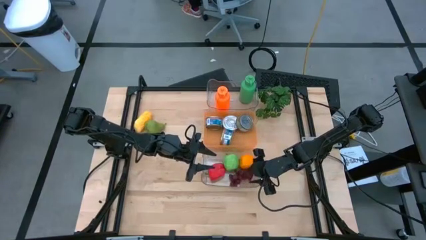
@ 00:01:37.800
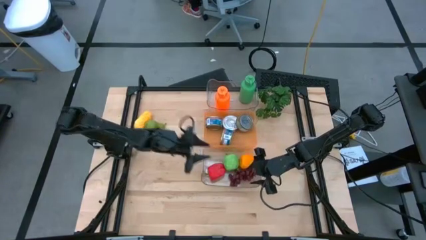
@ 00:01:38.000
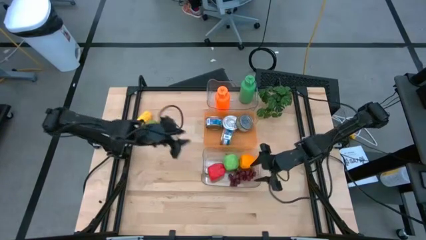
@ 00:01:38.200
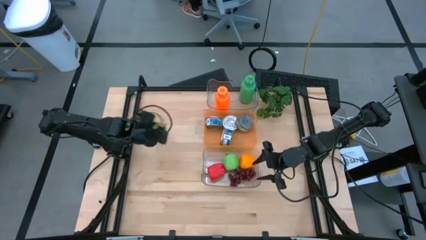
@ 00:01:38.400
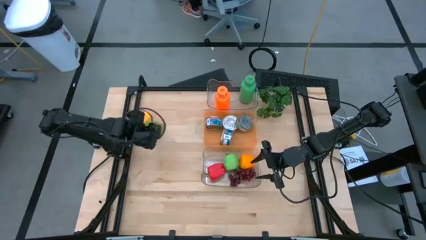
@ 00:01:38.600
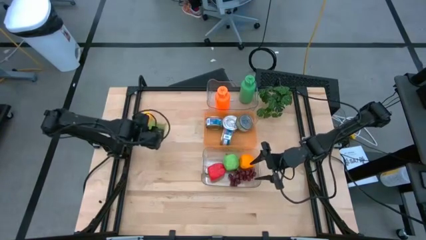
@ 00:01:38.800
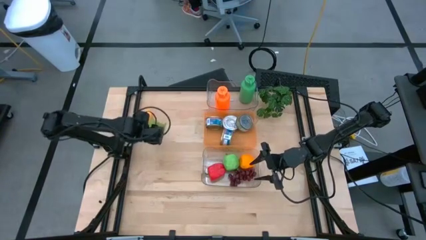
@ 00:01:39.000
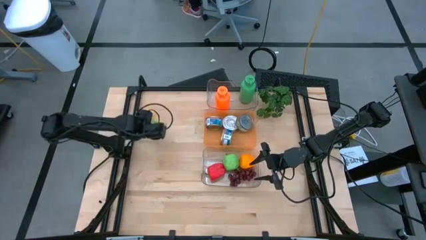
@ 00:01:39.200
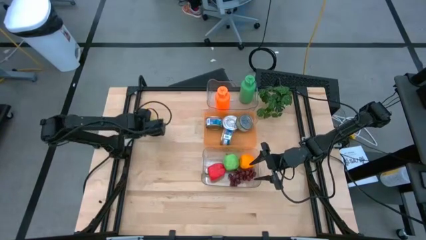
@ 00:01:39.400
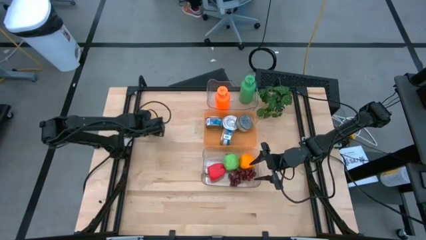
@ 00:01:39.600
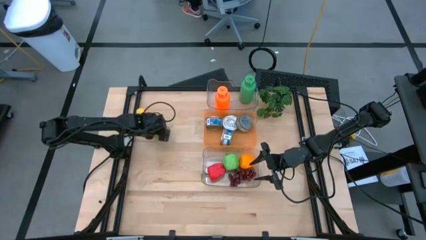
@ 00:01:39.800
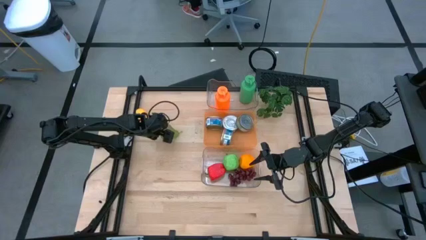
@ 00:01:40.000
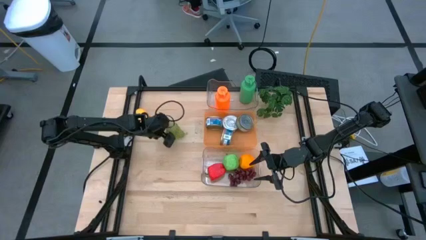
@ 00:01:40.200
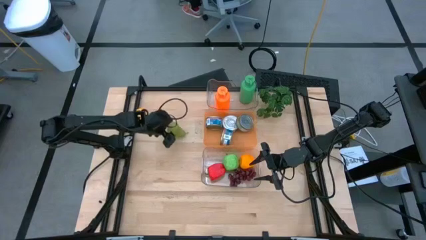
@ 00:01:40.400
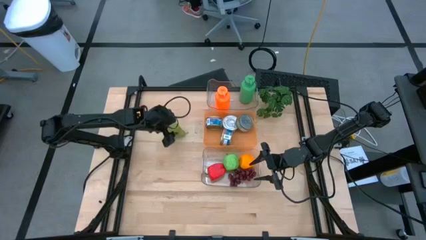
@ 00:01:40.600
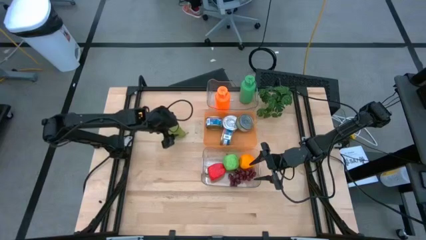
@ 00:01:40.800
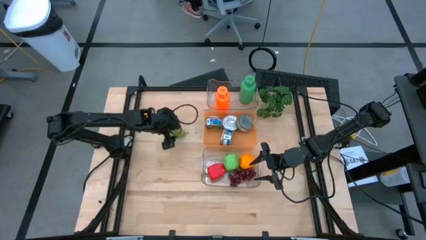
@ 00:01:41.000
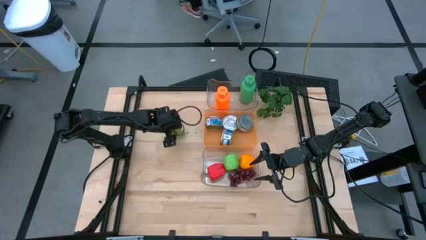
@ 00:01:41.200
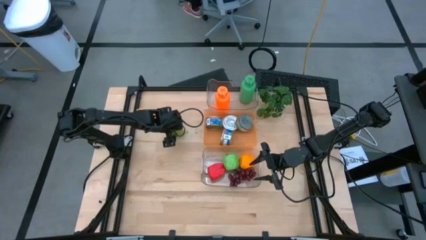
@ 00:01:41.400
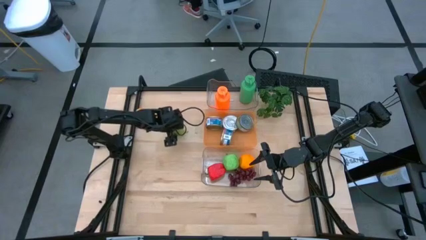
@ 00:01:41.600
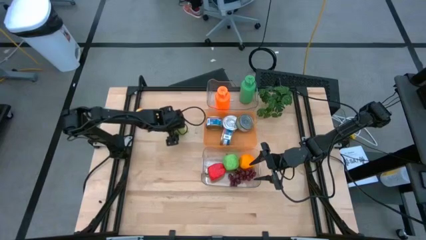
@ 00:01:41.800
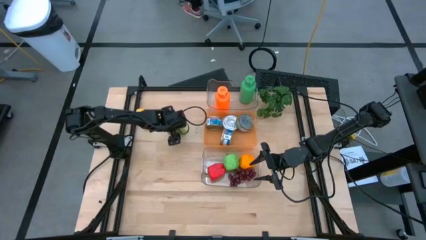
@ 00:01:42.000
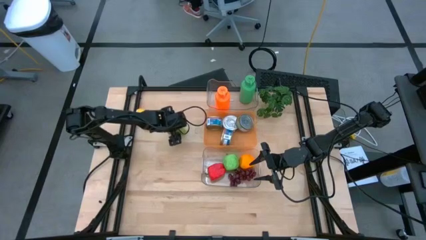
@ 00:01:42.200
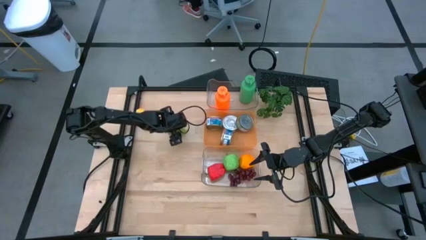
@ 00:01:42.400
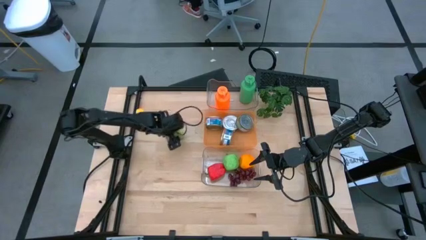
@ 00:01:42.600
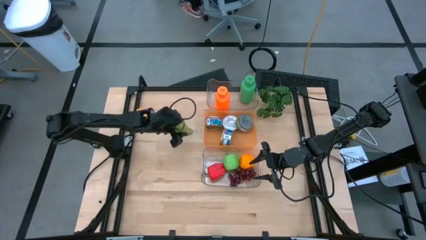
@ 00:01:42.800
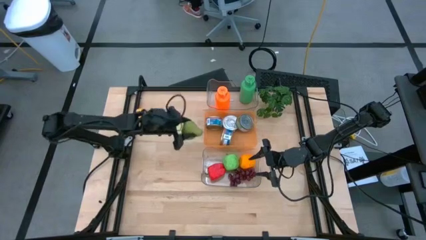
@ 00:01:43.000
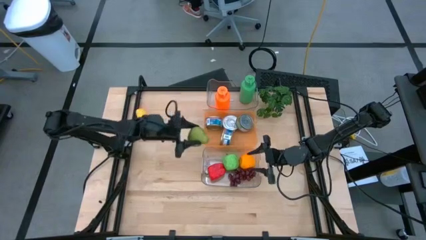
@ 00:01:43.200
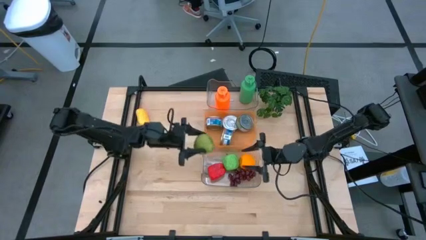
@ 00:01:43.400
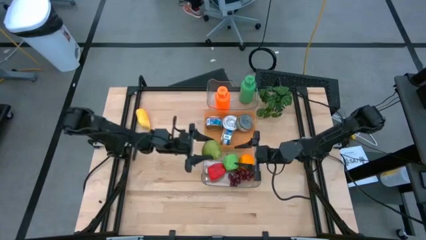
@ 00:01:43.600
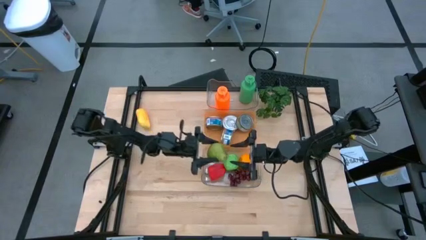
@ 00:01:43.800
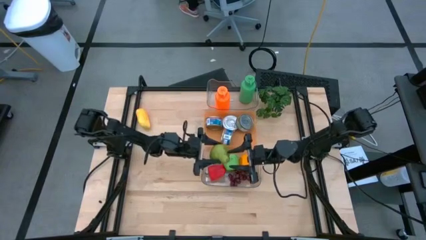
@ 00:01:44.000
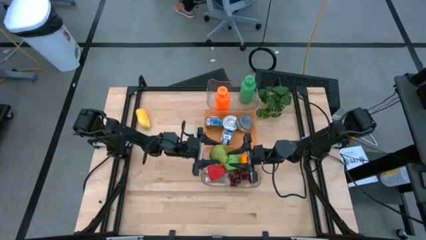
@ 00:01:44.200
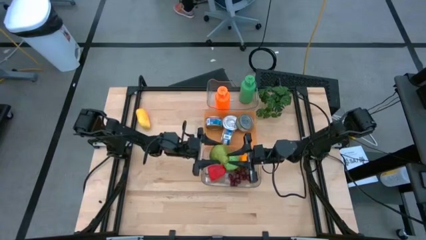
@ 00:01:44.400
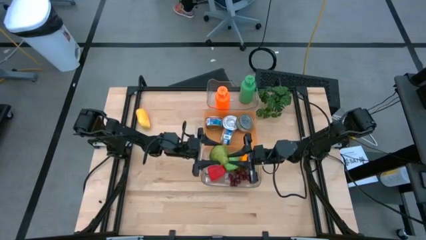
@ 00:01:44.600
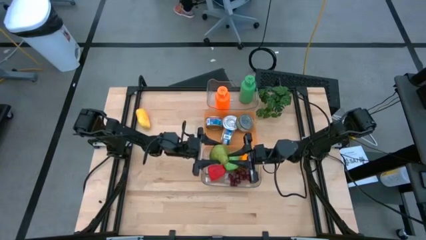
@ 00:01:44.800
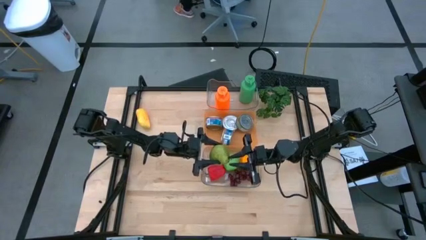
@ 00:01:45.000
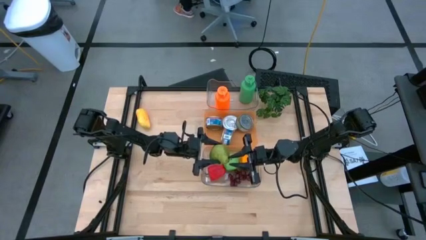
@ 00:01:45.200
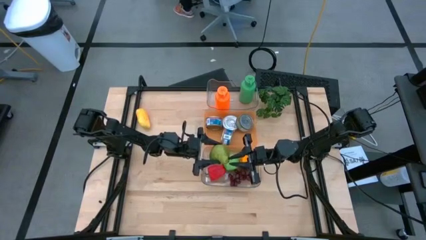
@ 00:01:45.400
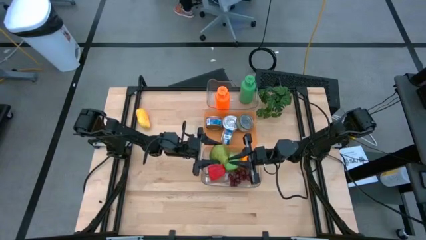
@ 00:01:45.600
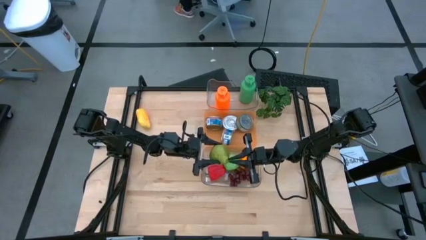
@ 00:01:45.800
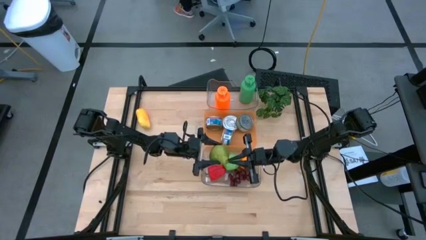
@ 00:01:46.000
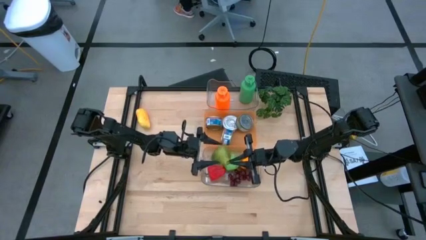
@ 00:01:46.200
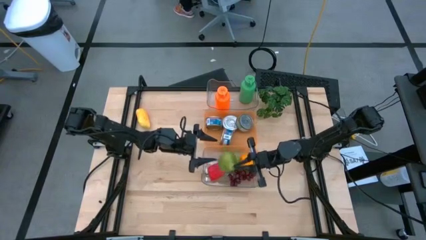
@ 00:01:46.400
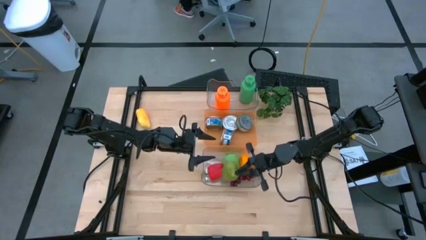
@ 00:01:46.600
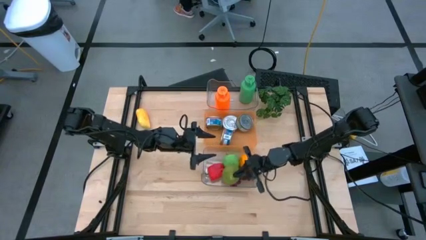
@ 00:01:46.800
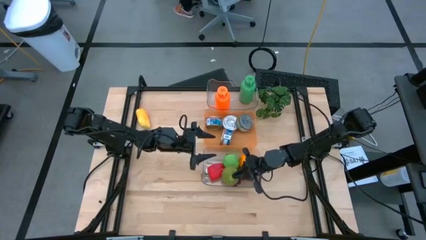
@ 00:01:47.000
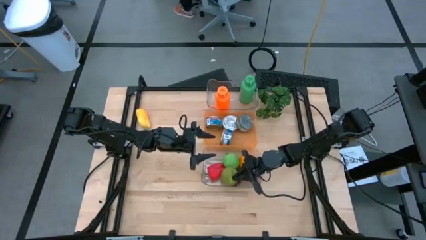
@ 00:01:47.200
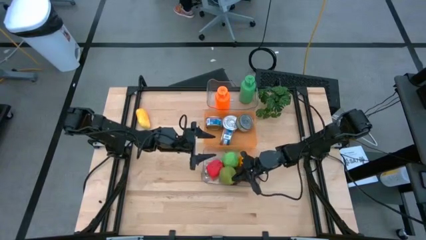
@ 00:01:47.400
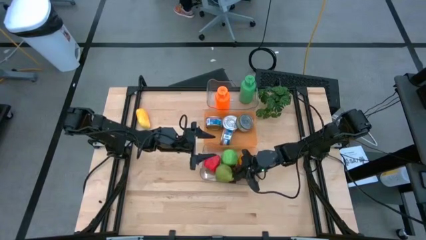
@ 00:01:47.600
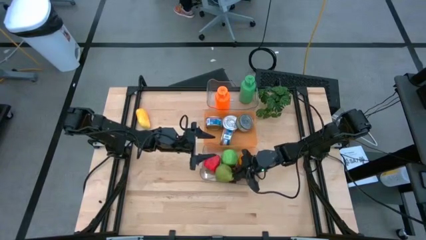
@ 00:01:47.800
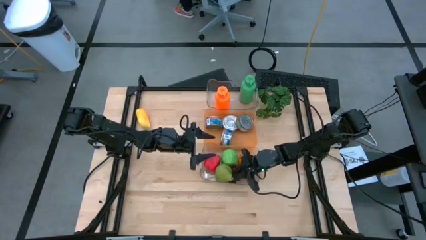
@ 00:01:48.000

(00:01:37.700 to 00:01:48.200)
Task: Pick & Place Food Item
Put the green pear into the bottom transparent bin

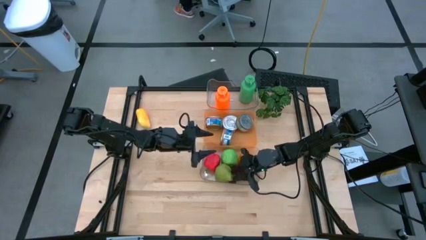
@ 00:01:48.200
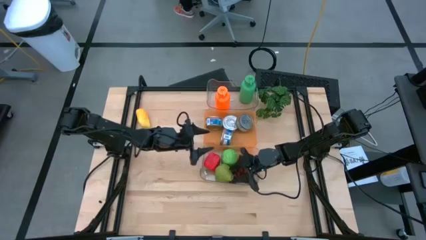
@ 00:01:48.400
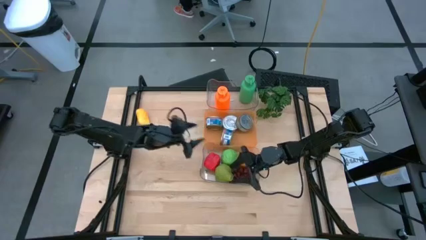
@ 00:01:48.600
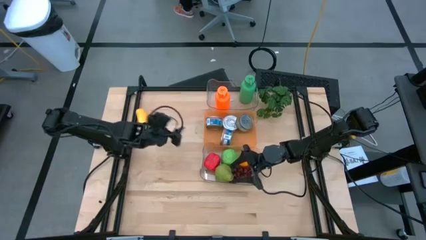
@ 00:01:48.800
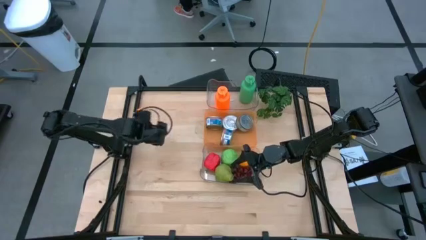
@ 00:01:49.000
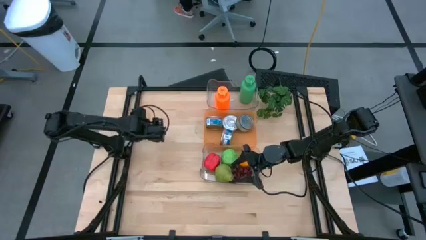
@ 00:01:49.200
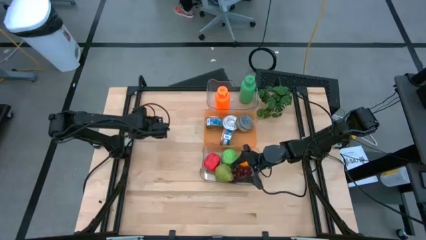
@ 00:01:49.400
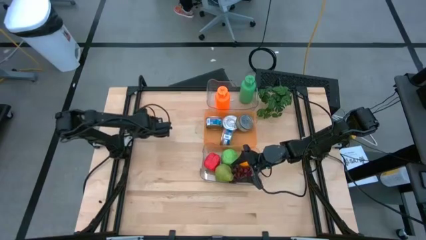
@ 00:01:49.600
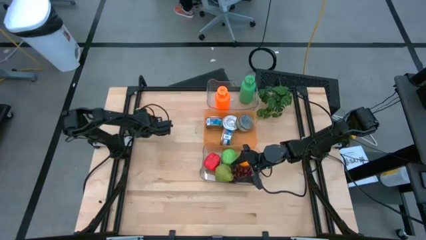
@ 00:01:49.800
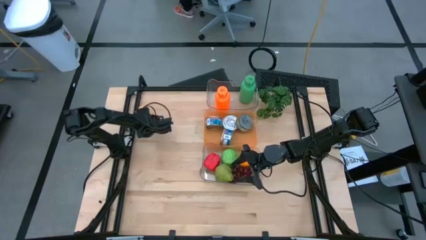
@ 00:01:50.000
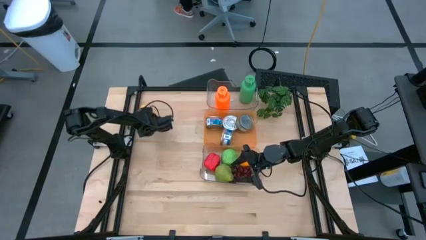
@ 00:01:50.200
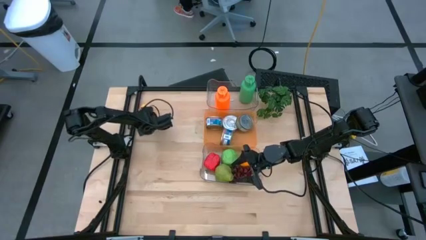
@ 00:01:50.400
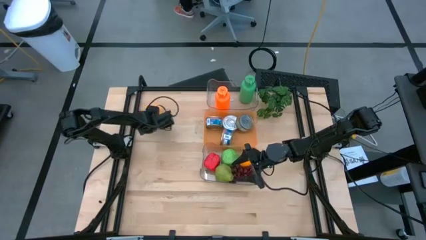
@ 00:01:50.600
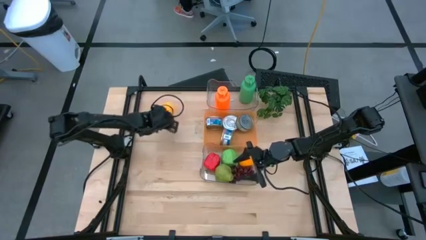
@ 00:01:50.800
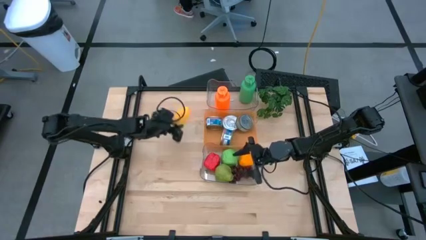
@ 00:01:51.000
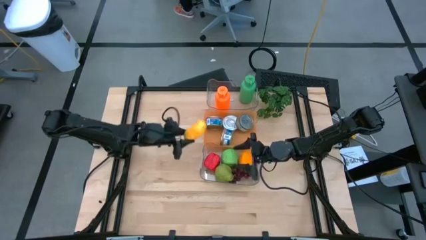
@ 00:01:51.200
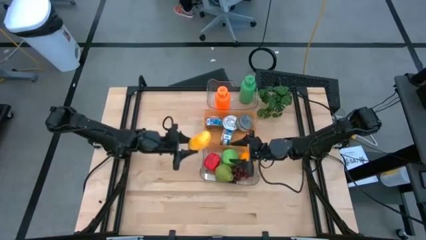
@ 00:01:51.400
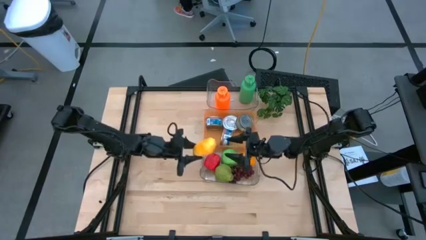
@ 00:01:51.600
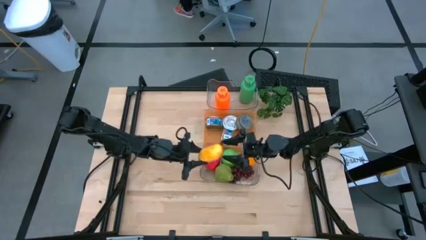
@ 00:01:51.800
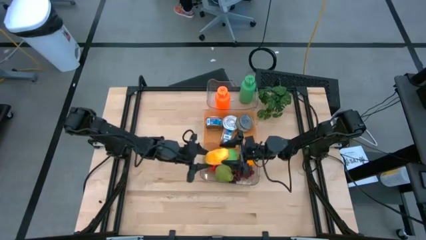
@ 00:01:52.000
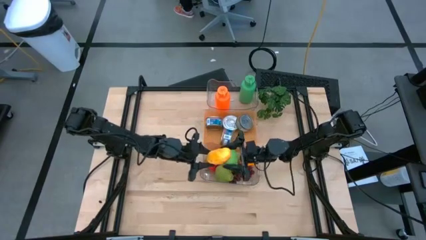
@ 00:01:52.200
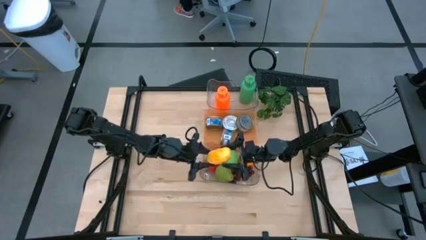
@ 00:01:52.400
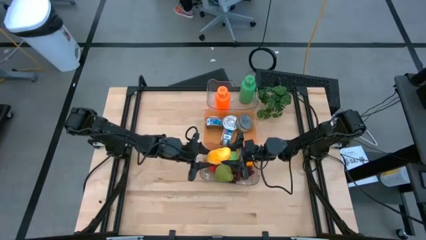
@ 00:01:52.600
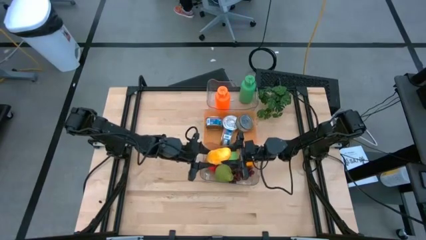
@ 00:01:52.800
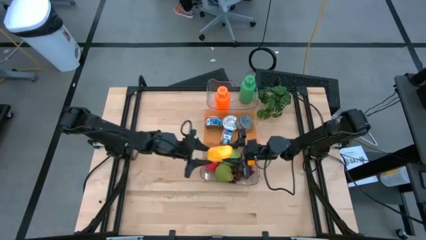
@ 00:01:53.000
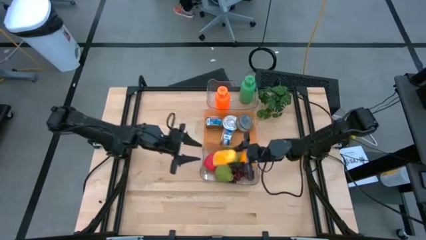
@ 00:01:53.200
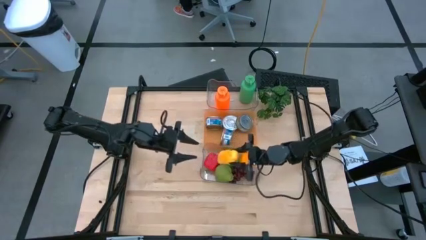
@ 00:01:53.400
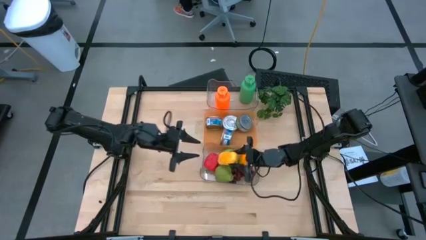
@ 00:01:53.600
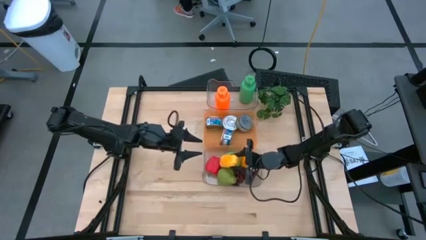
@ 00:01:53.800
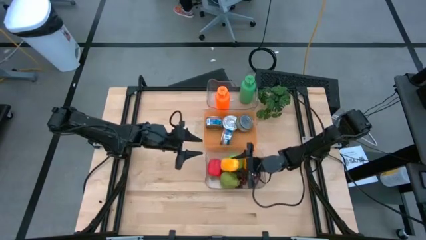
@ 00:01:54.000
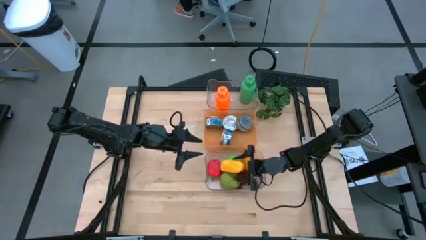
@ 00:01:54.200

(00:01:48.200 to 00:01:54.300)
Put the yellow mango into the bottom transparent bin
